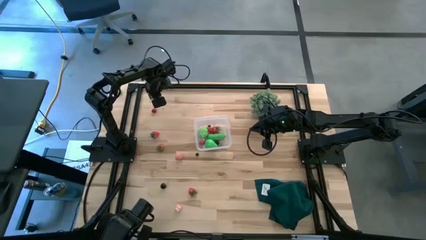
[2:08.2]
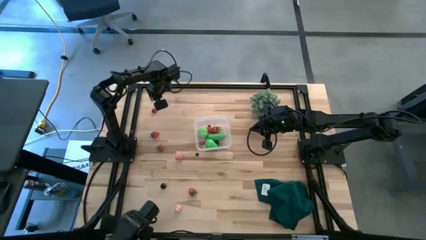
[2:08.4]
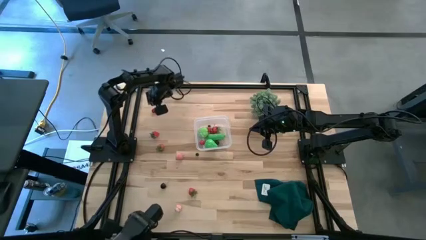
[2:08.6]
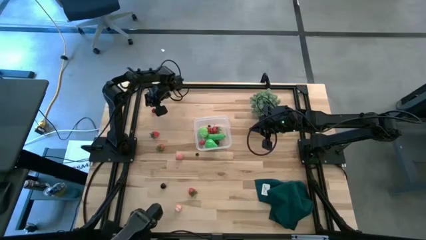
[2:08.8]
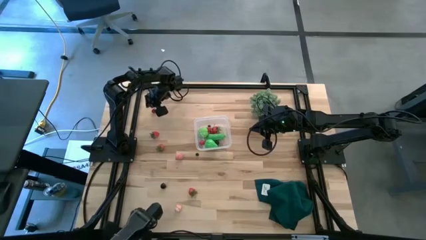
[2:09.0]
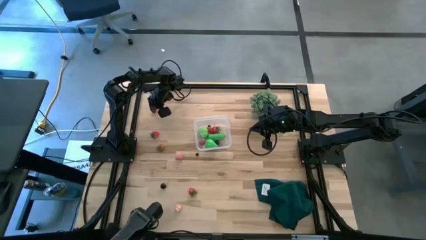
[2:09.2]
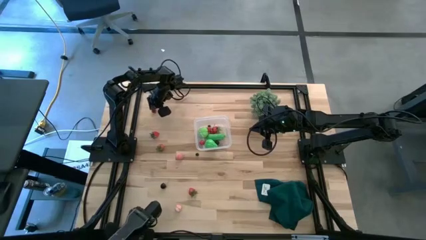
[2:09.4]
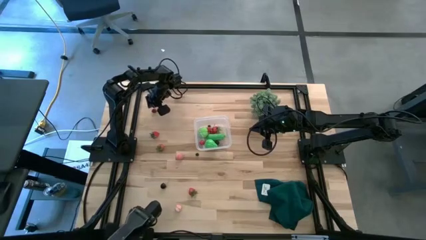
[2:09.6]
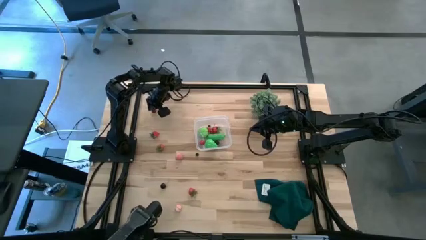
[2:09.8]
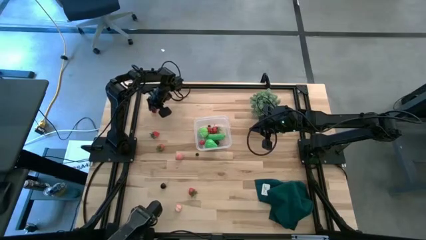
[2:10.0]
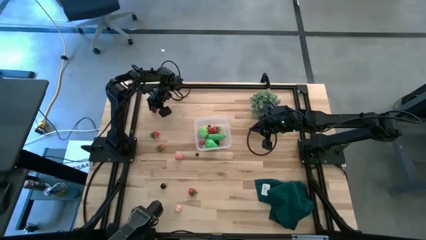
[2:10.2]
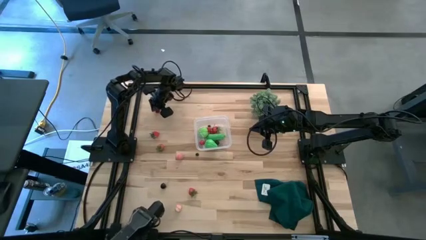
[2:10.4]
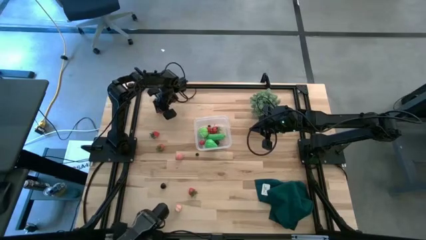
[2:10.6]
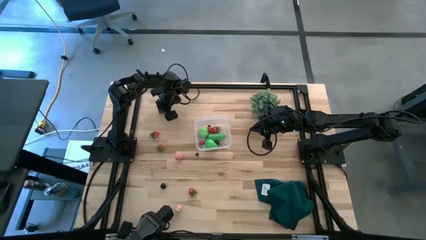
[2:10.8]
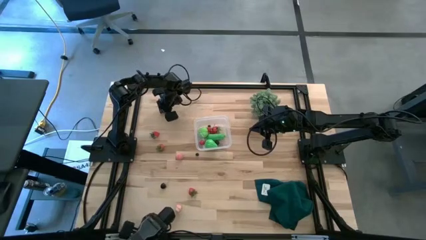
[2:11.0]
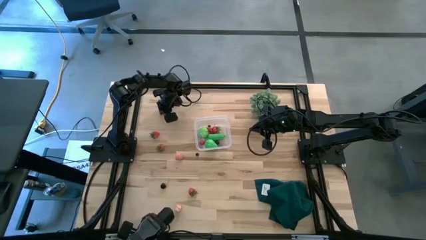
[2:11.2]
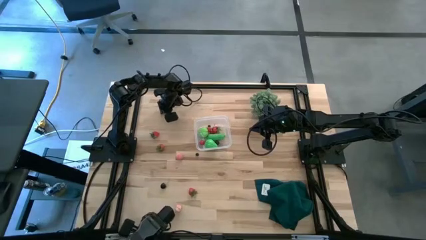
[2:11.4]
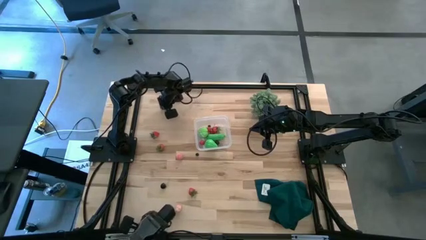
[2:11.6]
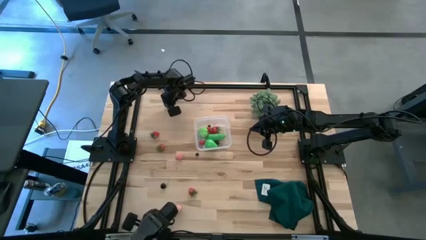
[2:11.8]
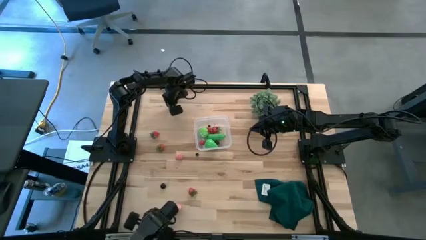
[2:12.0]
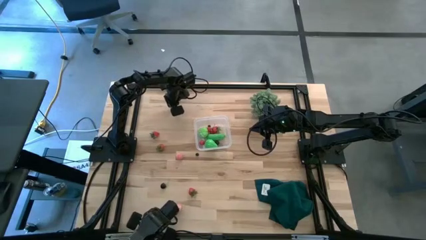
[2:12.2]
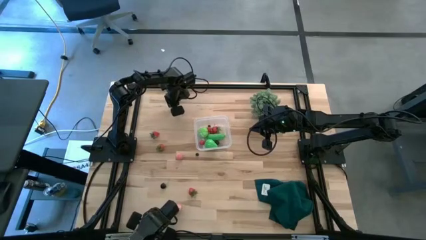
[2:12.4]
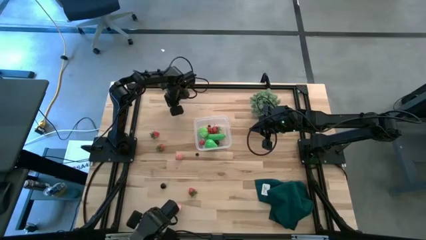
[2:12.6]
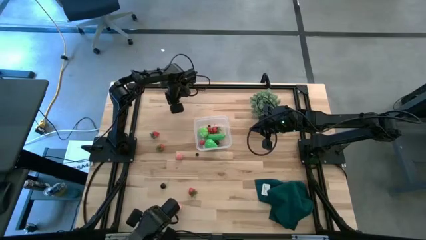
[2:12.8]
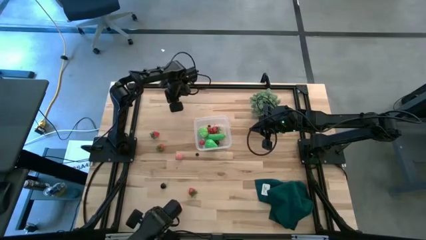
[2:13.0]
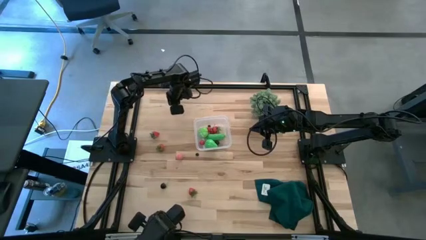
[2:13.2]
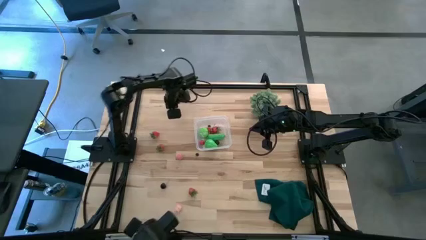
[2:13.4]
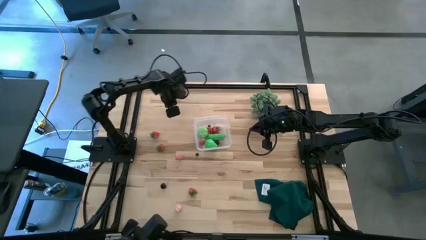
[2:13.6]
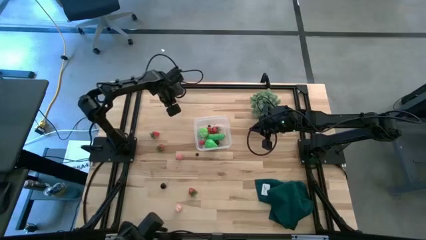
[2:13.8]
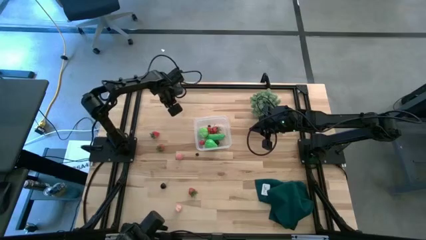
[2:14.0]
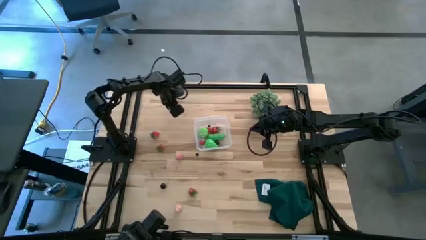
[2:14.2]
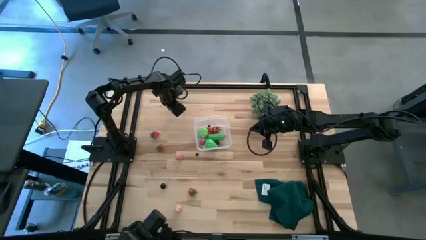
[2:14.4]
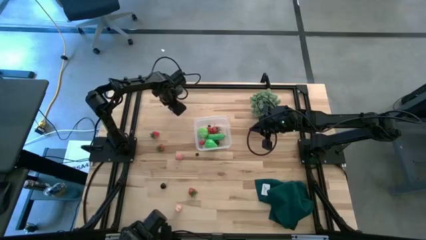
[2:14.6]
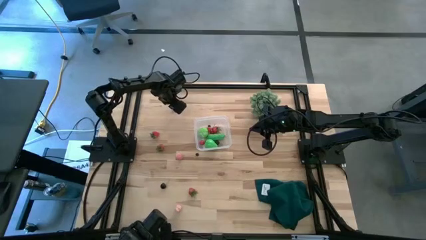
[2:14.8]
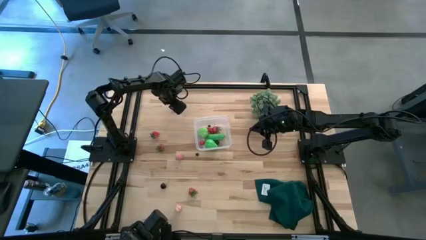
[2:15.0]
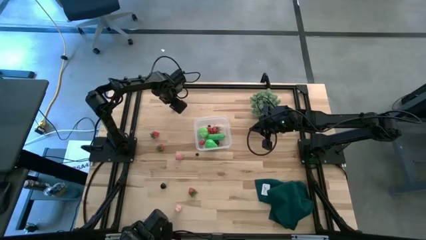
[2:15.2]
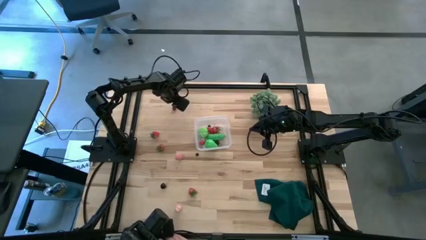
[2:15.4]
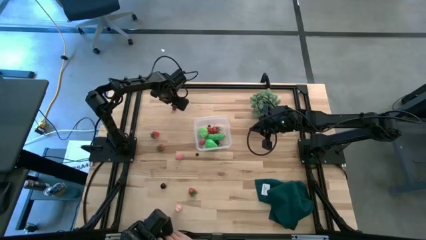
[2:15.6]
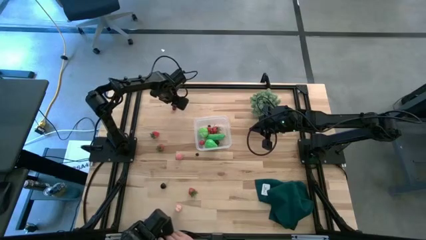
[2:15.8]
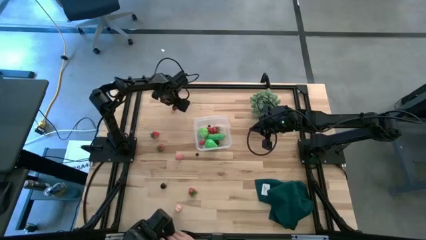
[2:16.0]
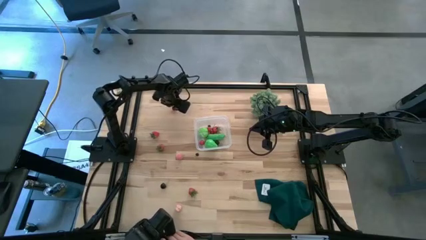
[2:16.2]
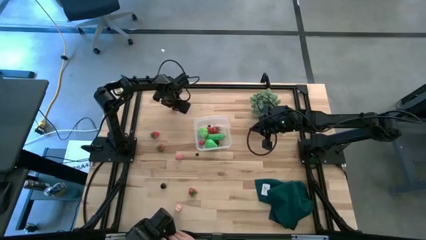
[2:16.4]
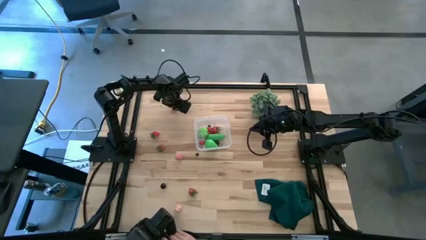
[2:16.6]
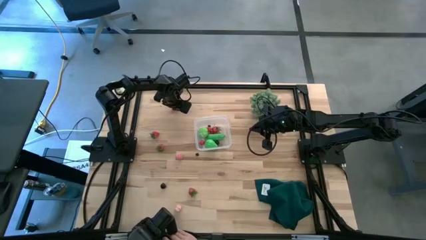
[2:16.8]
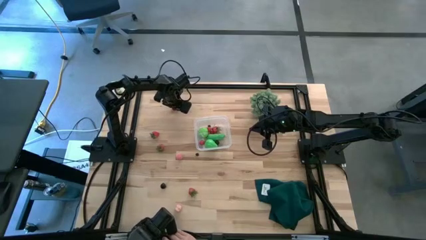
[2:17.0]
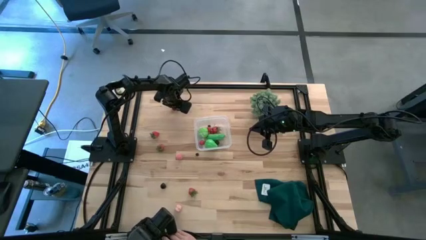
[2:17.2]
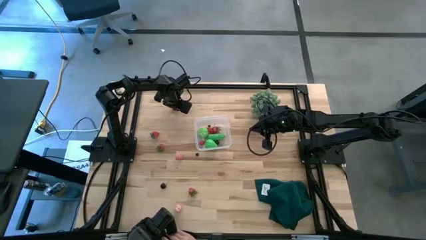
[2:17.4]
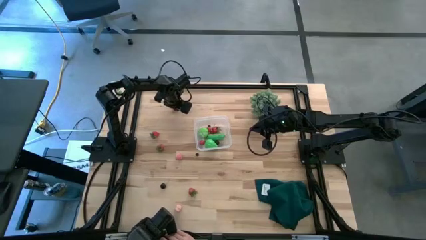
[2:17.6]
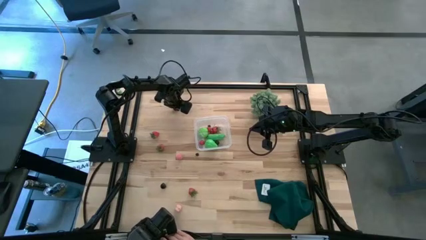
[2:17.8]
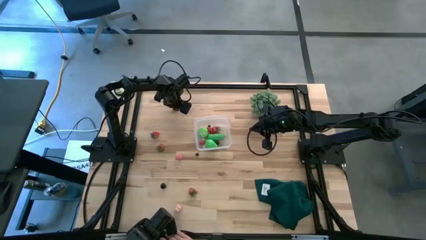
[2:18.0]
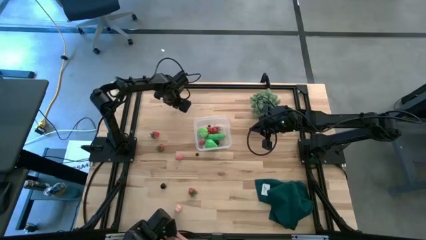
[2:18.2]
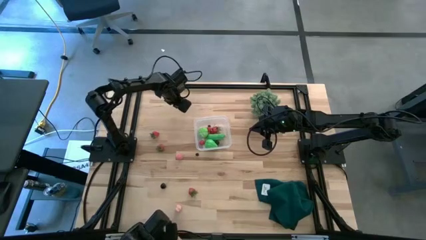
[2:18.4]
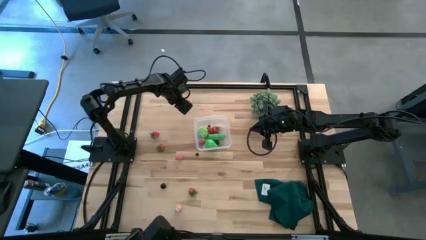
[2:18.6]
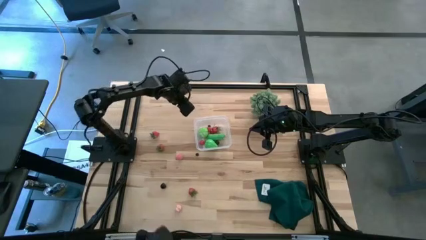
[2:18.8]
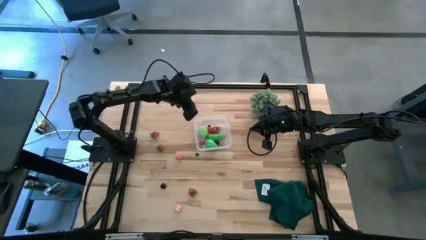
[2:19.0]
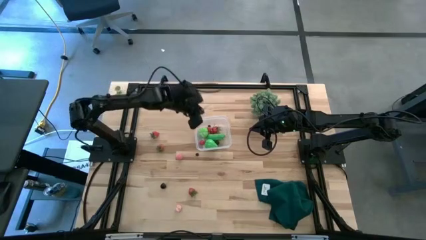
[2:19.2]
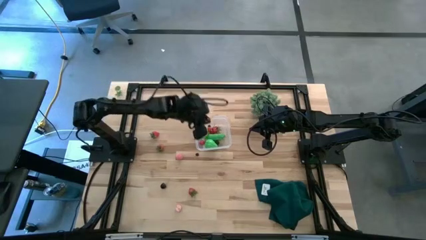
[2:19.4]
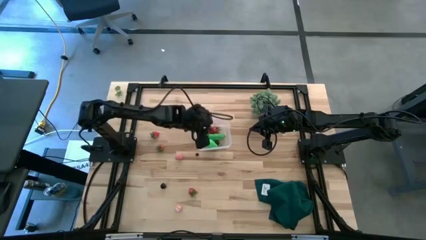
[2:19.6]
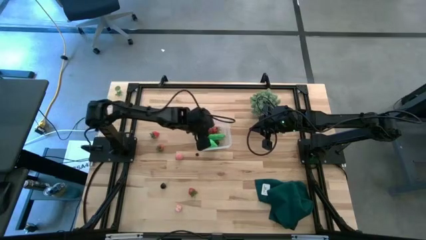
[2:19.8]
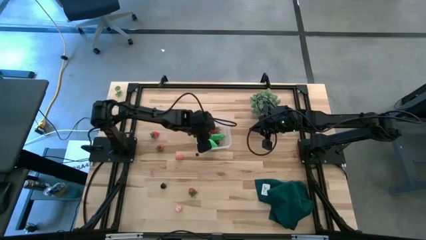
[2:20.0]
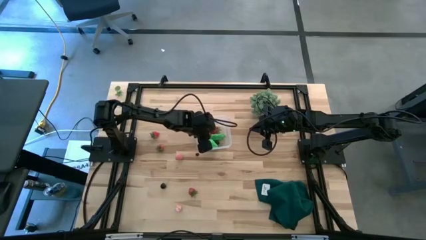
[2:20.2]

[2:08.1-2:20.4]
Task: Pick and placing Produce into tupperware
Put the red cherry into the transparent bin

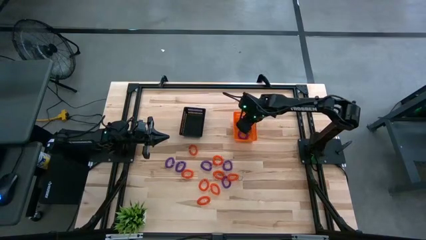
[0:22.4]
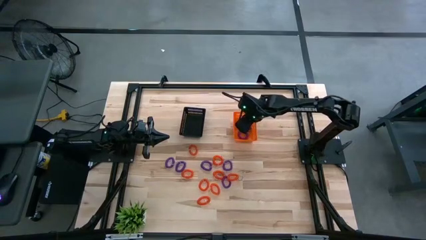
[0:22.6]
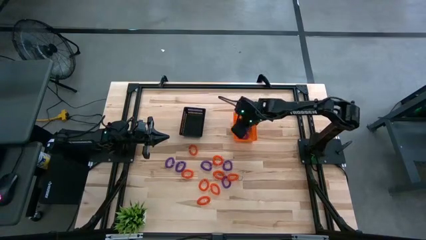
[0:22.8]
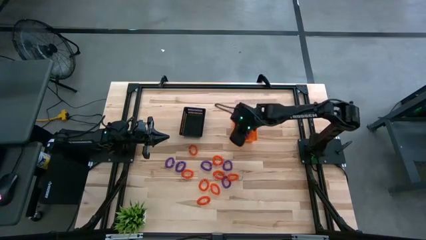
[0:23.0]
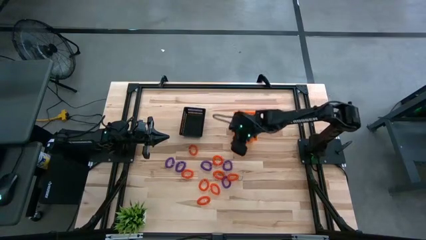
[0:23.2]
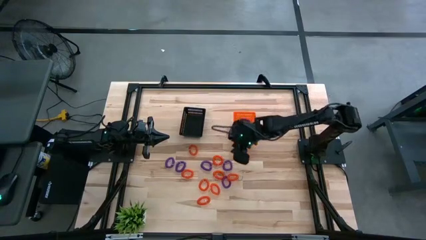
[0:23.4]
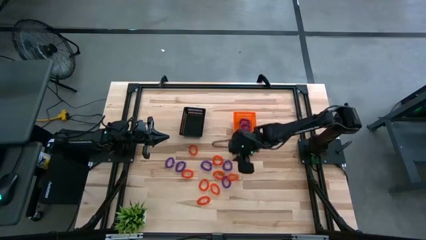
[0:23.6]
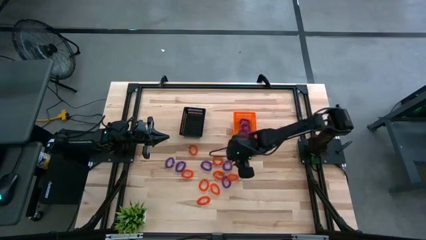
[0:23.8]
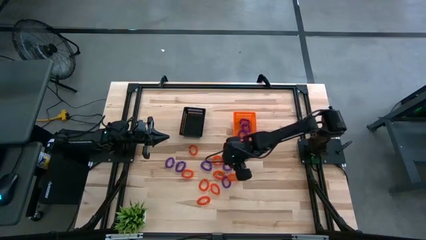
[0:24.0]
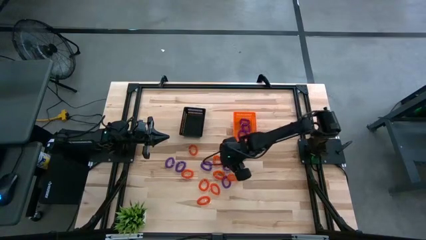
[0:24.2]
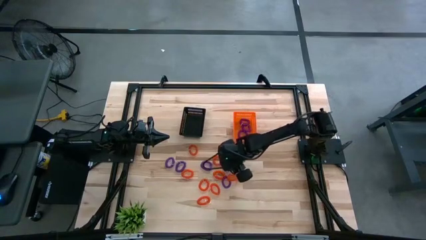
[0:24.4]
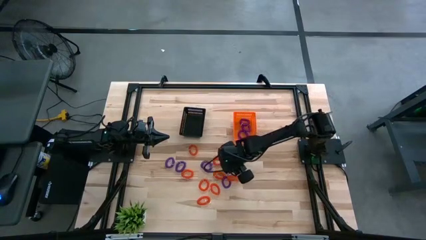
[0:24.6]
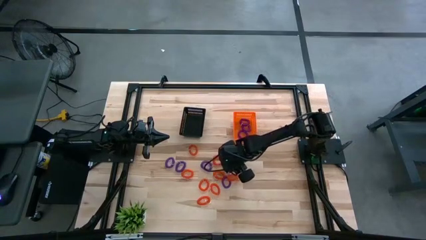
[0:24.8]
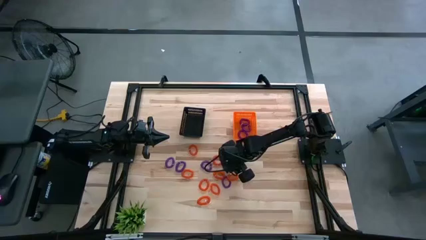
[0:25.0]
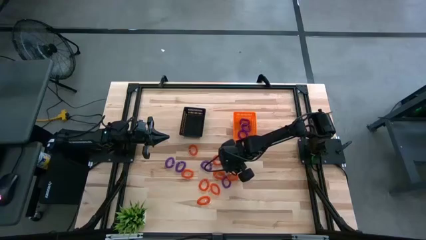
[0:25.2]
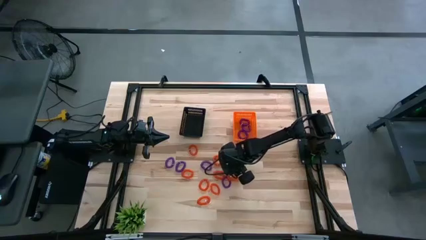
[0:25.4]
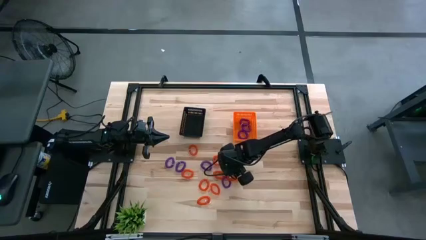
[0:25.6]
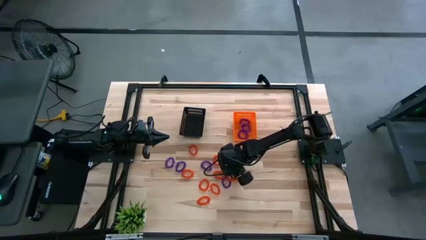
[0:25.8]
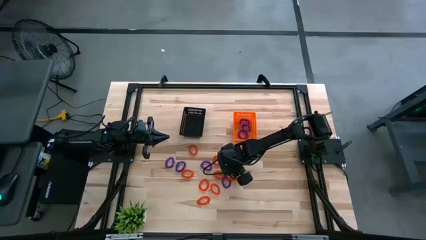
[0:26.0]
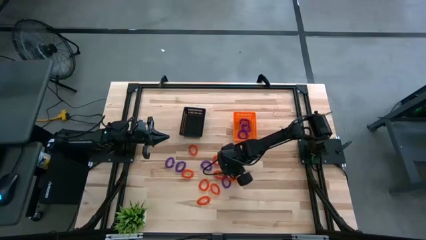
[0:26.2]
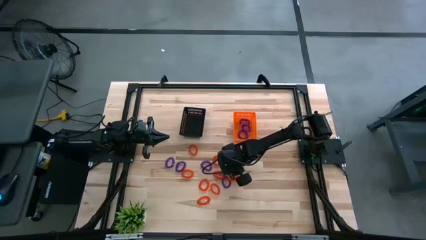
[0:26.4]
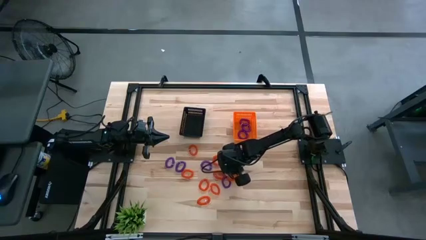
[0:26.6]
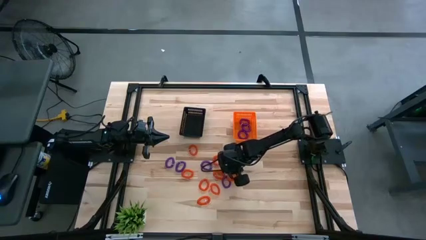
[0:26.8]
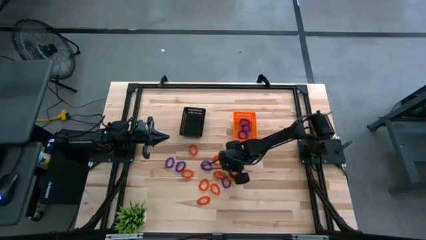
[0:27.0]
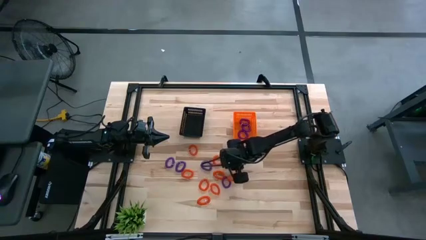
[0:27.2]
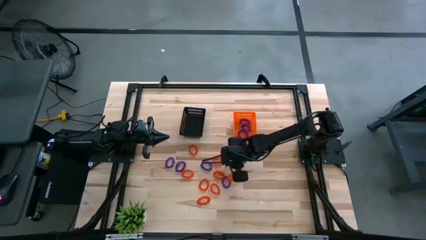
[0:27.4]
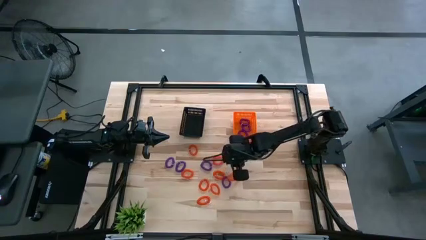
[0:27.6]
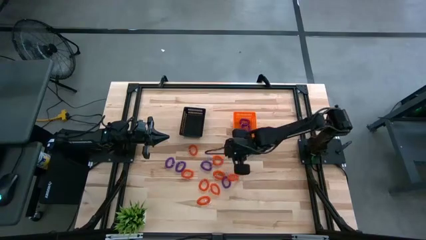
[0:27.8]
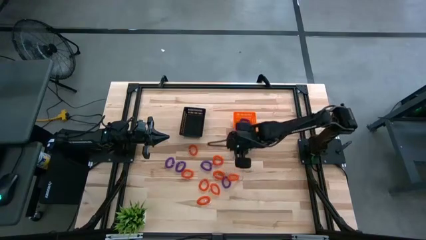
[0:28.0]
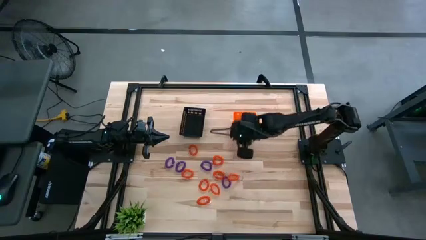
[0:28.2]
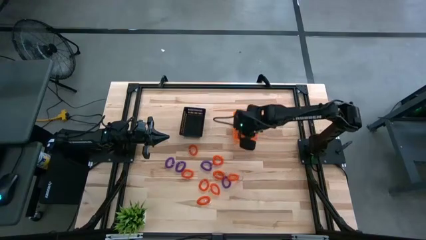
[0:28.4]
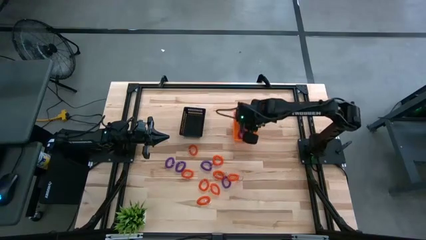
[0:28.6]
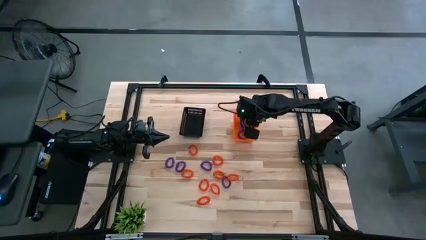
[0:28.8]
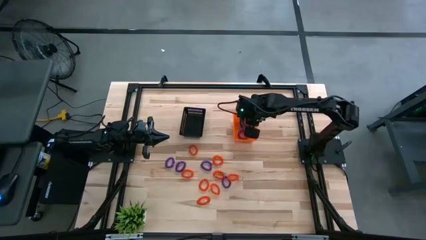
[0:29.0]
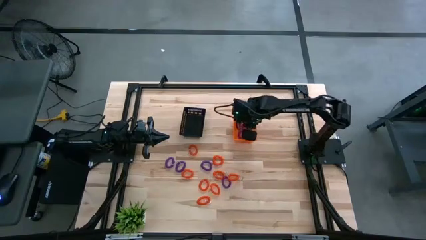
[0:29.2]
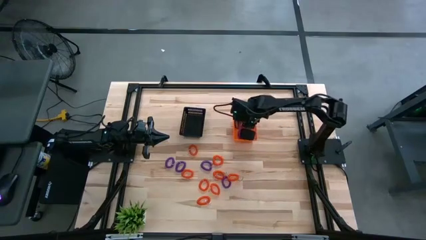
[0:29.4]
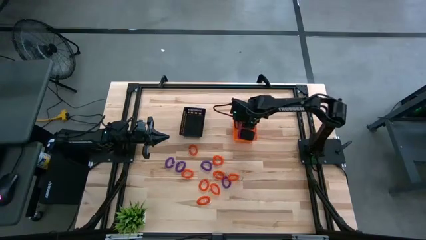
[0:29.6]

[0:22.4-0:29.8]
Task: Sort spring keychains into baskets
Put the violet spring keychain into the orange basket
